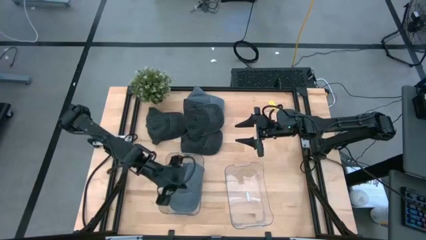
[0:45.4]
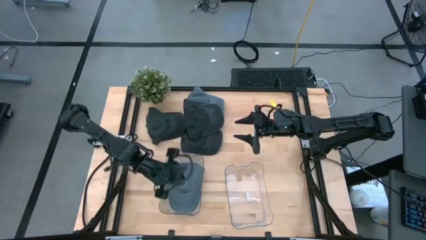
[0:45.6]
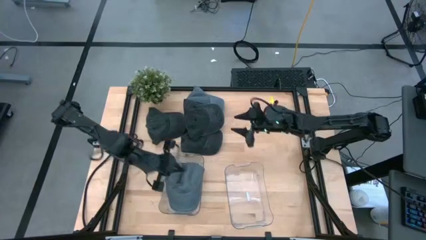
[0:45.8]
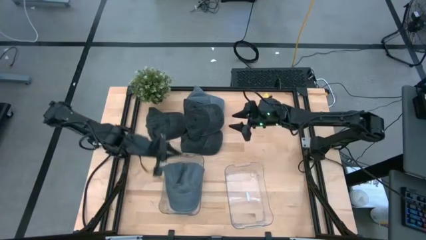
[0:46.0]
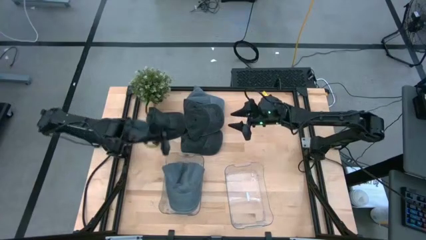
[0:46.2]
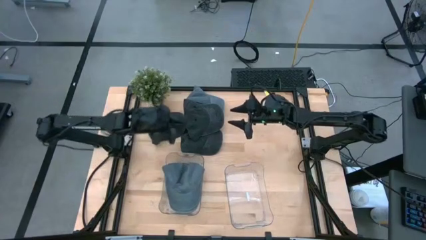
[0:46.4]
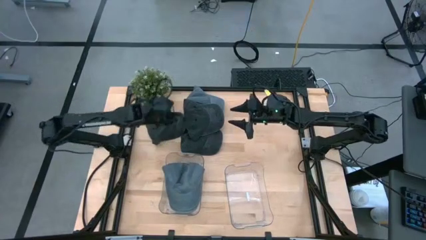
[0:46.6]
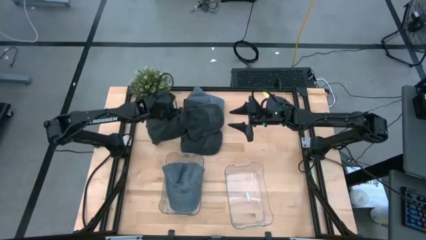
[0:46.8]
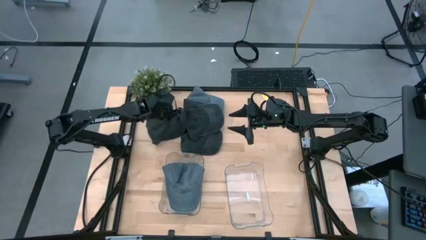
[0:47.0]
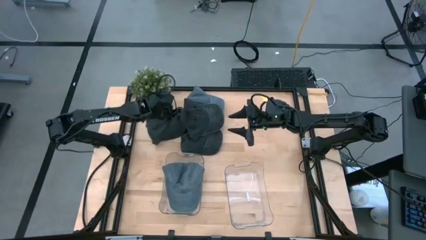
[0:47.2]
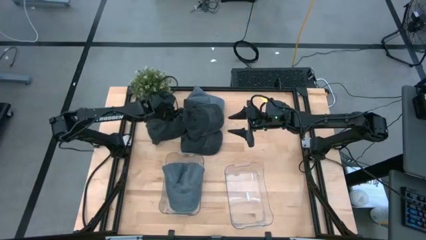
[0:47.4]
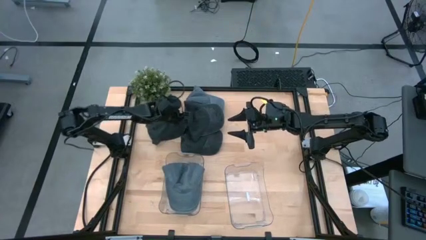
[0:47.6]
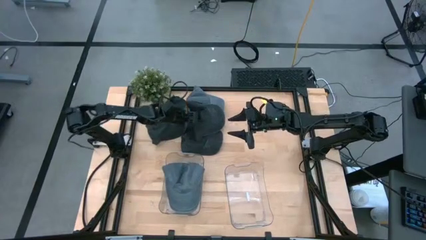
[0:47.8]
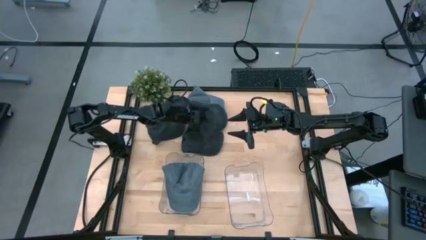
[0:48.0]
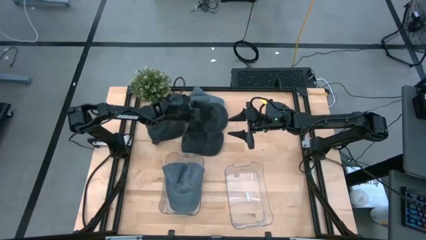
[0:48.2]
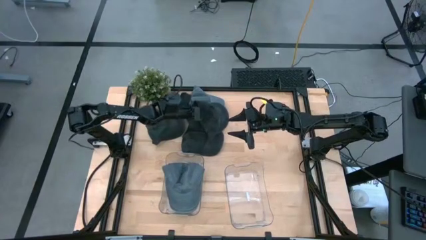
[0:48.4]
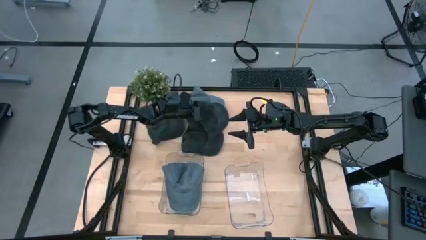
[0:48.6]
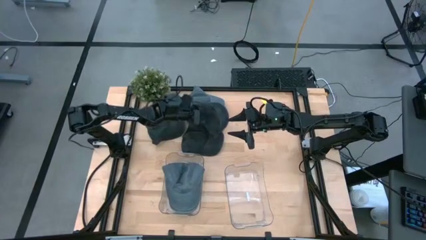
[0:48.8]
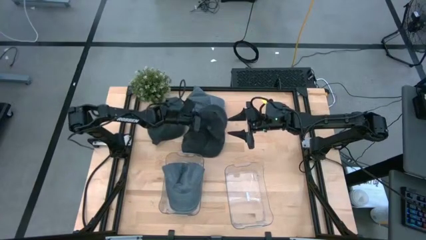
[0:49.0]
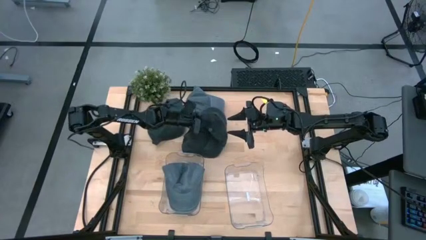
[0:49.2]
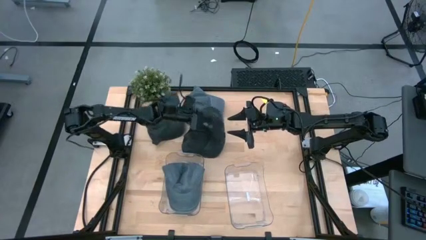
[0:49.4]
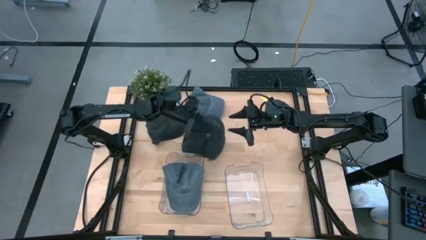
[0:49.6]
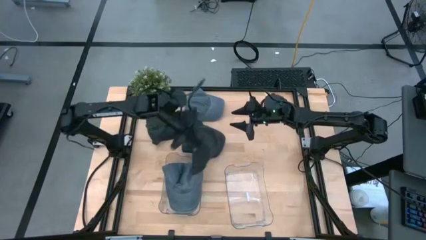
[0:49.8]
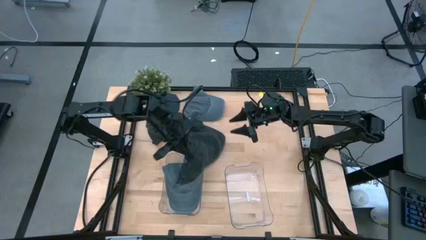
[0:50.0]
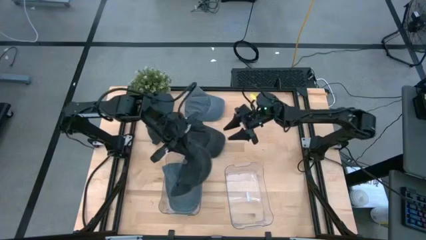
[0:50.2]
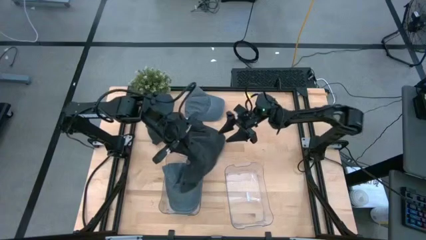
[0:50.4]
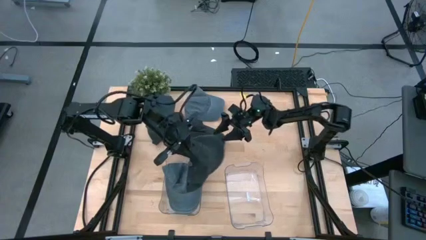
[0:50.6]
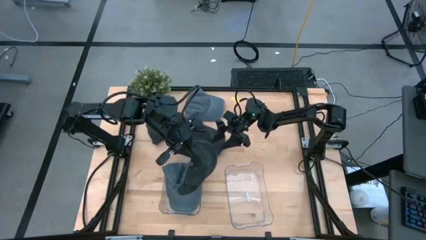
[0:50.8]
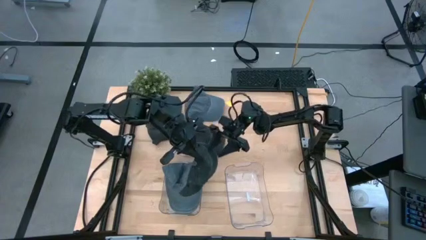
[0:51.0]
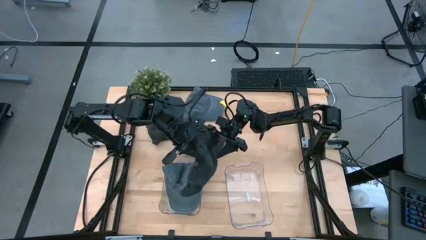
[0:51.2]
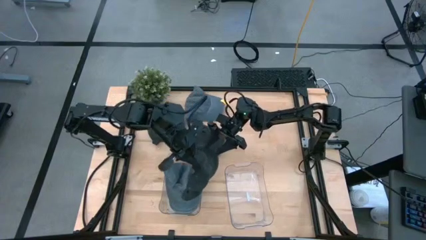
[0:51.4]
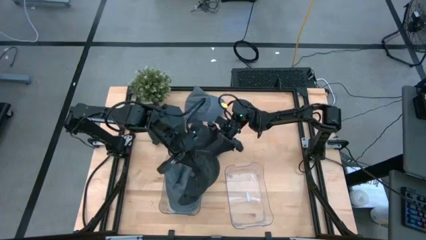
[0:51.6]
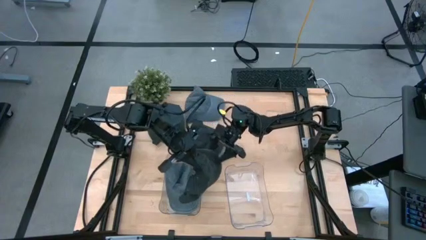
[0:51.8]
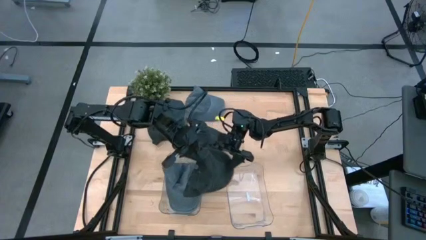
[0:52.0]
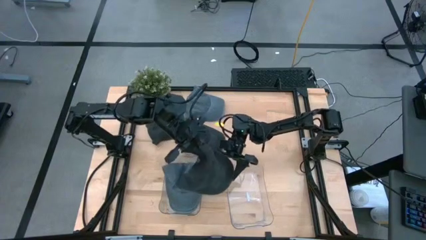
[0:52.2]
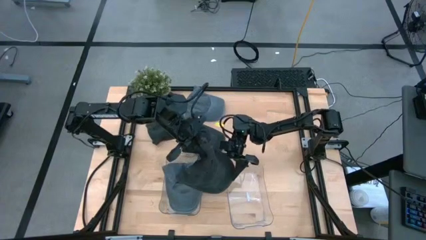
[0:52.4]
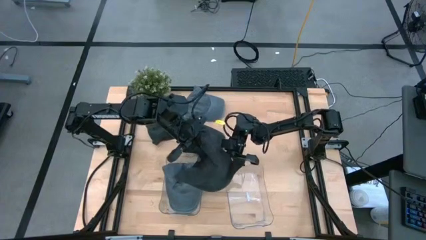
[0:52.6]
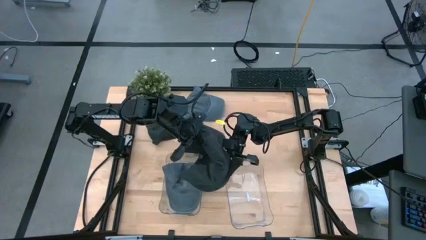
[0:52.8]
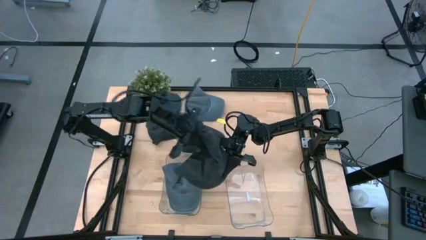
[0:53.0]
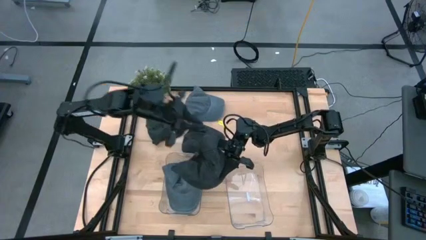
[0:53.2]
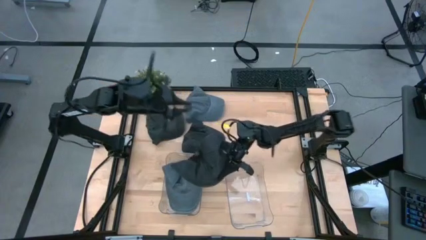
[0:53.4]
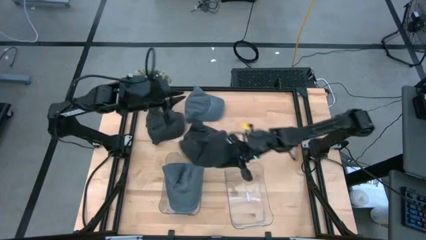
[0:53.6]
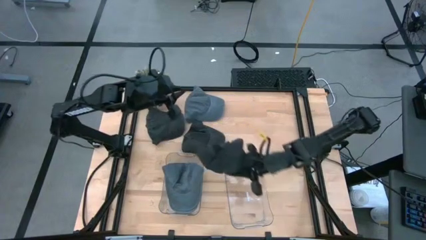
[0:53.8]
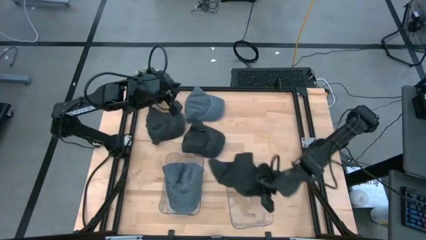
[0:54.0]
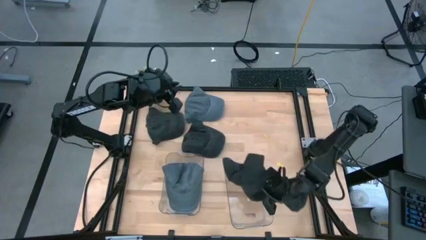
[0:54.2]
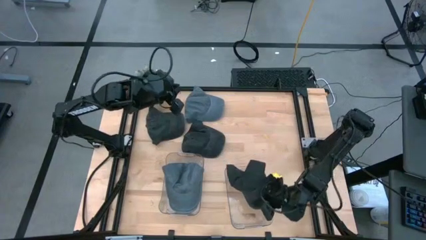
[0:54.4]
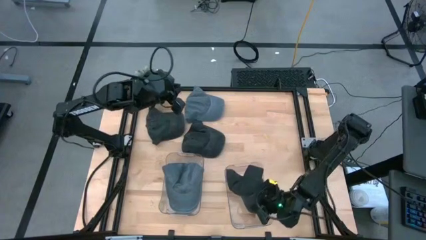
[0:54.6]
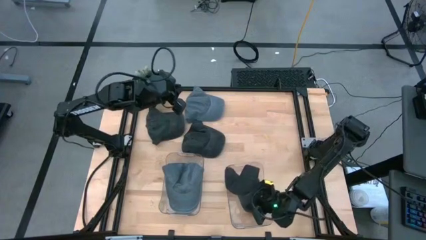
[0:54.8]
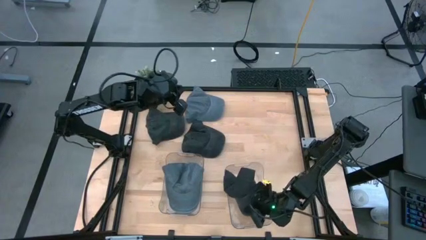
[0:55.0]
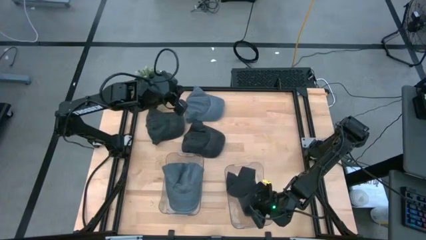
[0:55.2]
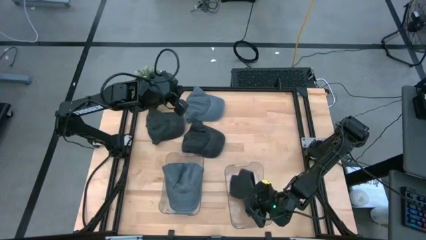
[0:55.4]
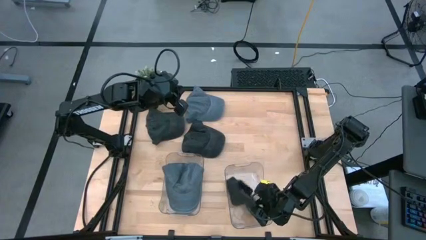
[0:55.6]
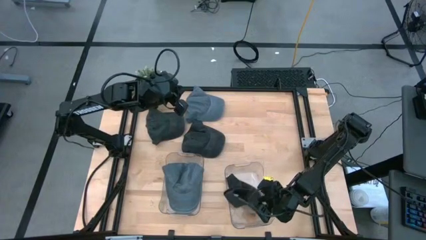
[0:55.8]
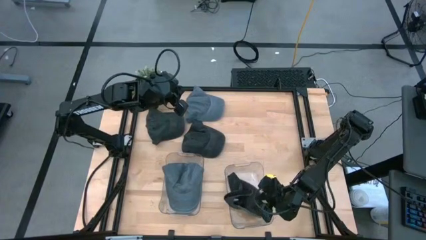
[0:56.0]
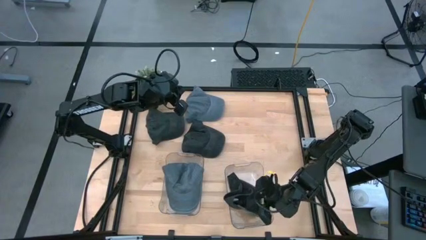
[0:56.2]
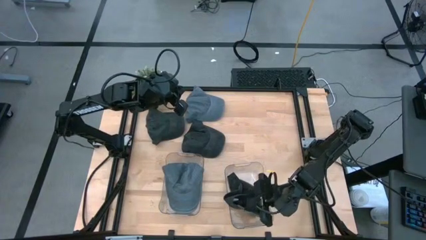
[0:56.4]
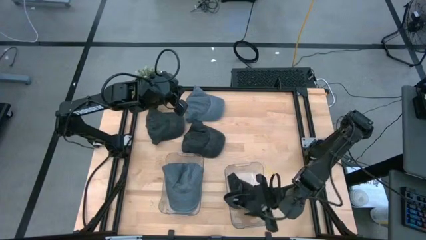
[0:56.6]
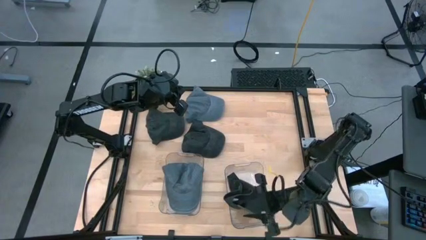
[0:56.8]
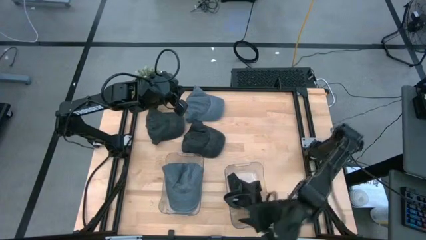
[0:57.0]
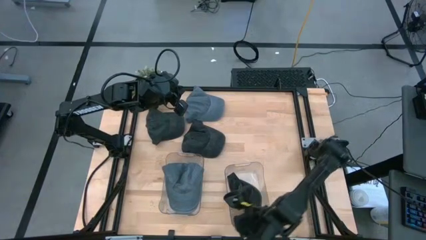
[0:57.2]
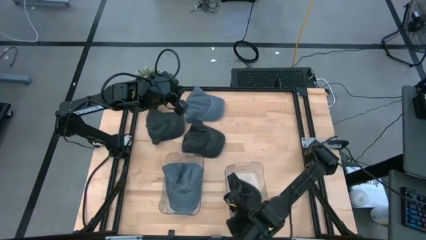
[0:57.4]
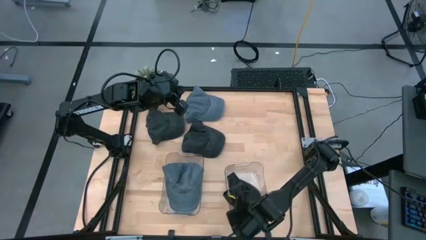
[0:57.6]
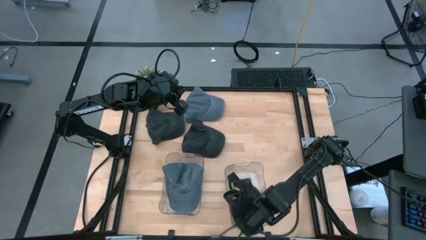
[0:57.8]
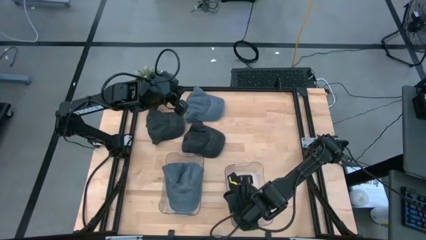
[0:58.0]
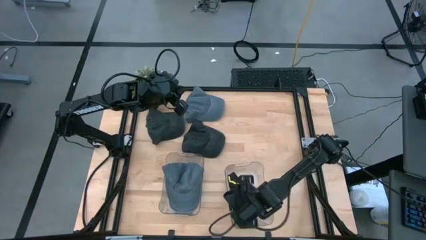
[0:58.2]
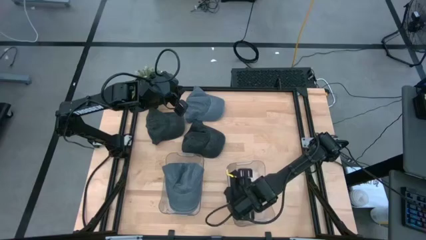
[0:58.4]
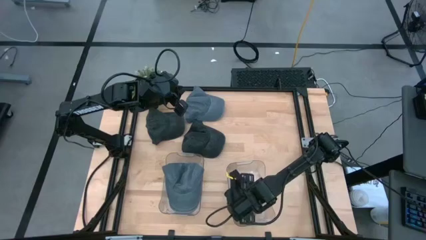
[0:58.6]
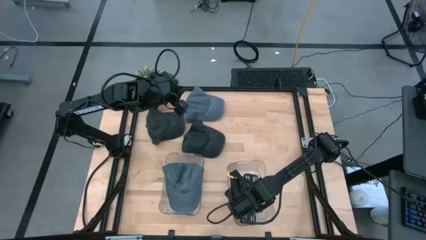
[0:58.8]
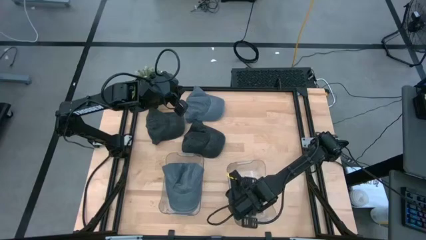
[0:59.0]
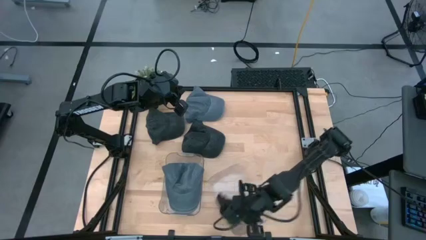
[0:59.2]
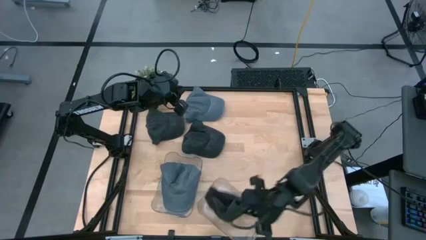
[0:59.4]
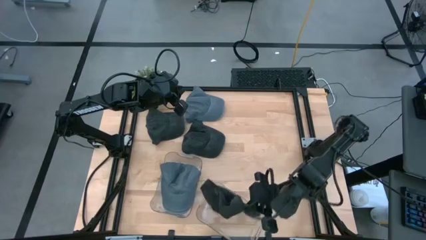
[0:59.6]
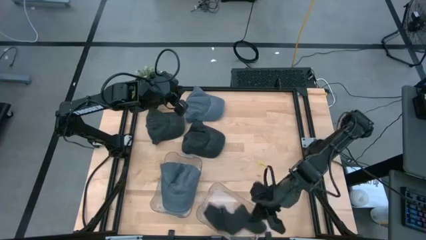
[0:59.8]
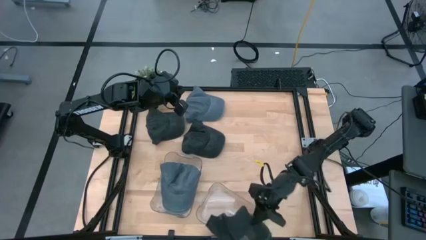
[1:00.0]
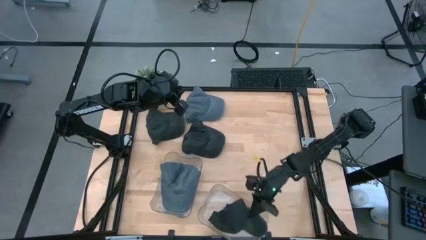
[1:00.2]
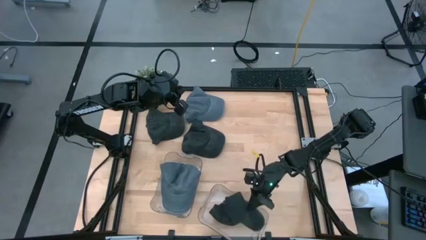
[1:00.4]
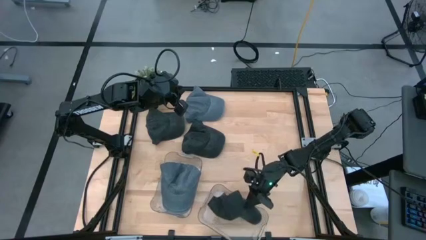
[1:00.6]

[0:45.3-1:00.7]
Task: Pick & Place hat
Put the top right black cap into the right transparent bin

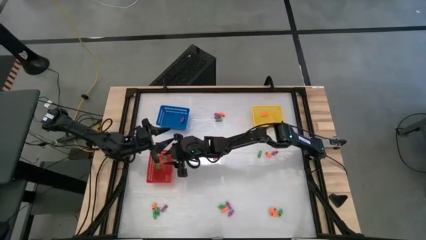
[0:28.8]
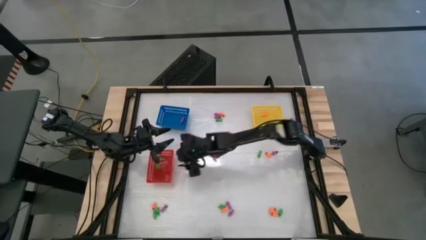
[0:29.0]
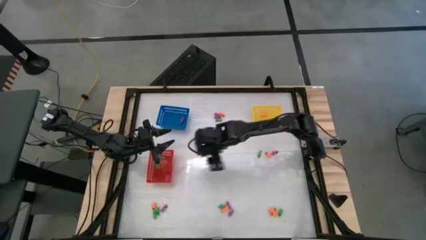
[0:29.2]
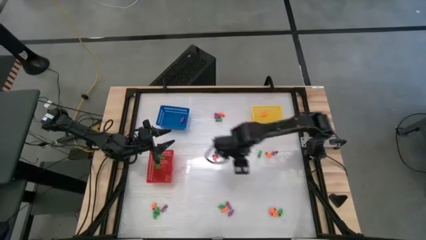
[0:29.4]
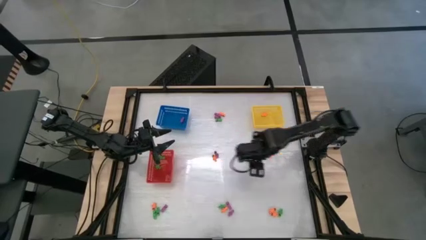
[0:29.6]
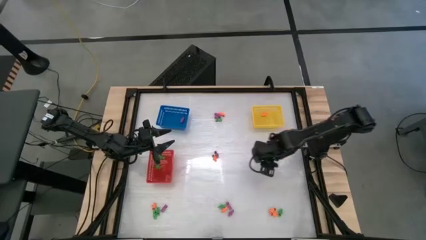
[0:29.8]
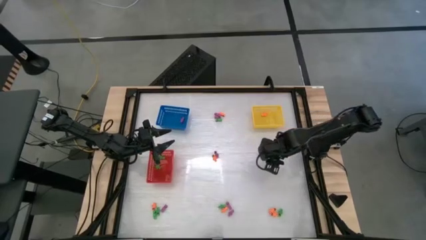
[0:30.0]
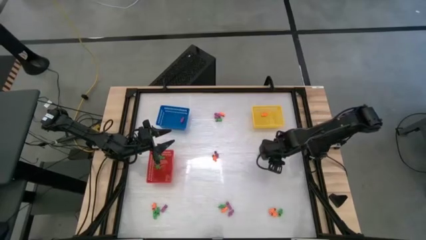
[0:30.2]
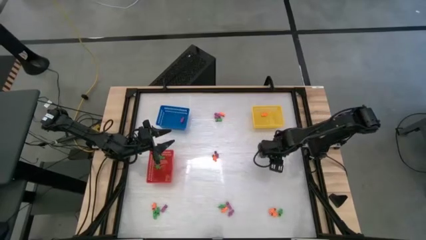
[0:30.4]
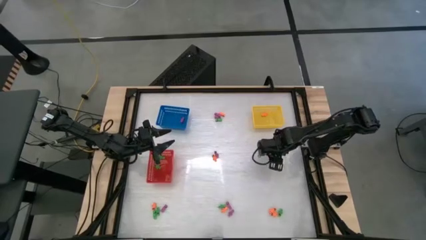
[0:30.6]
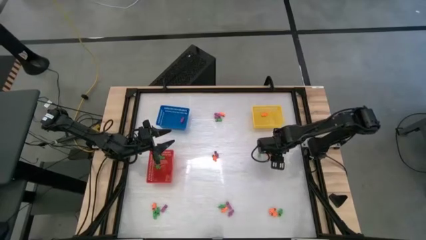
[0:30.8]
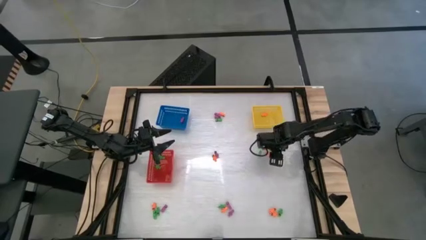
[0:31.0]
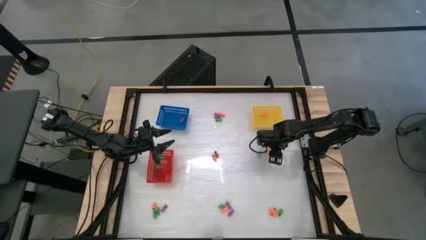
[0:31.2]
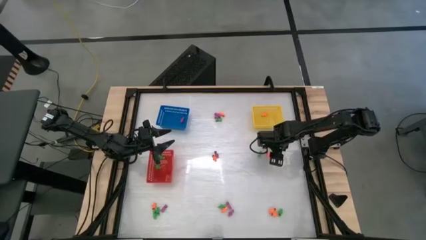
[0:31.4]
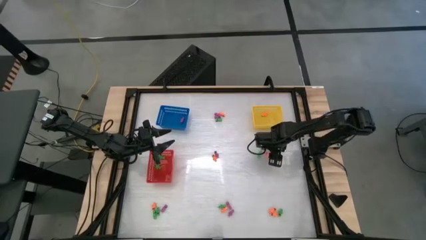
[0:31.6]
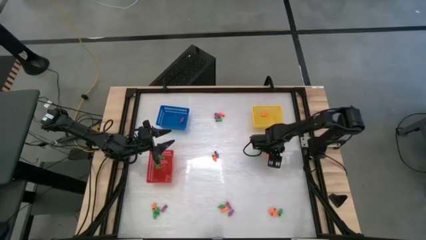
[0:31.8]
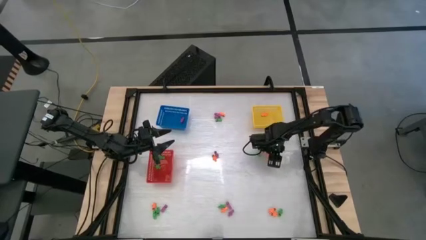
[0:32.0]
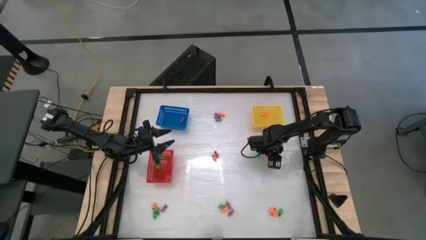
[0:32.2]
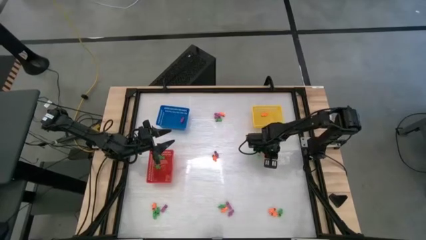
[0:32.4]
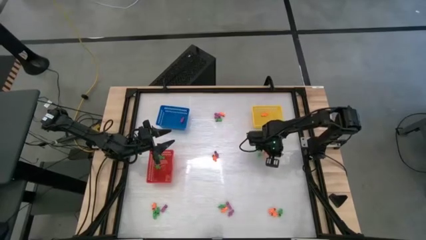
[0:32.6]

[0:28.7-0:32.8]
Task: Sort Halloween decoration
Put the violet skeleton toy into the blue bin
